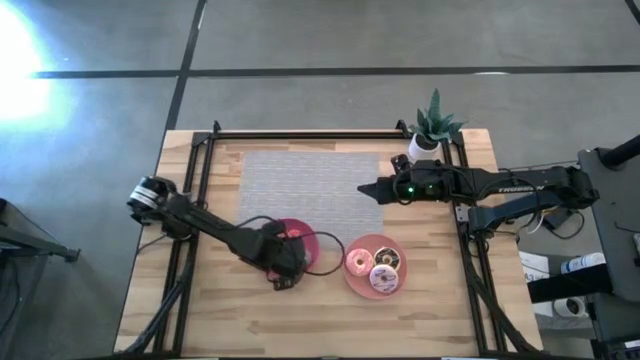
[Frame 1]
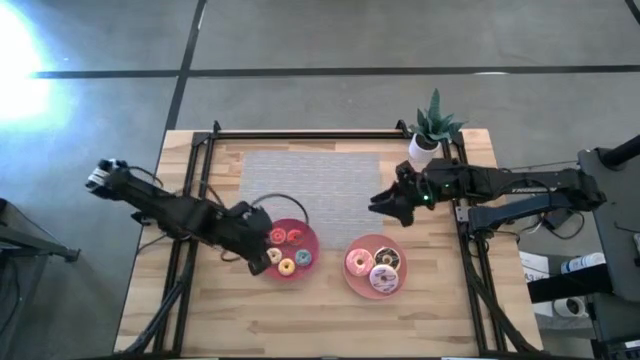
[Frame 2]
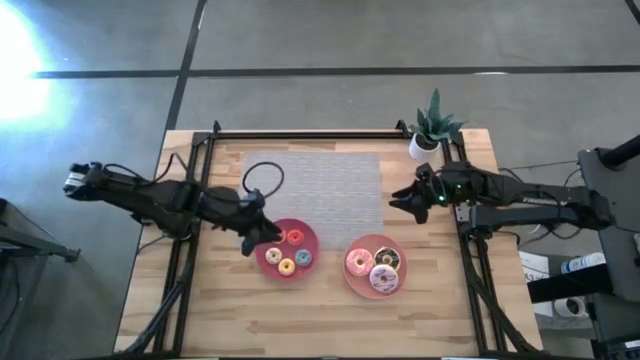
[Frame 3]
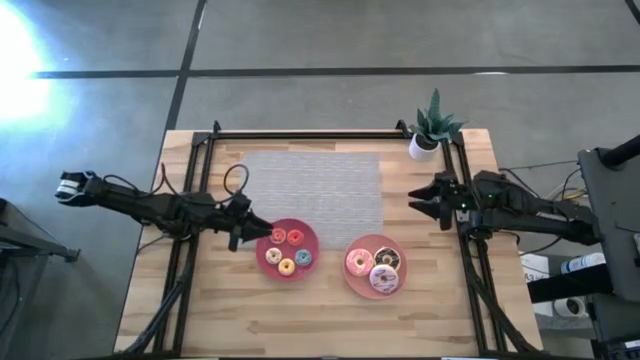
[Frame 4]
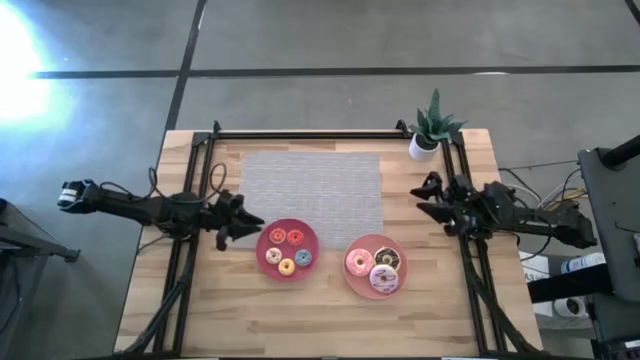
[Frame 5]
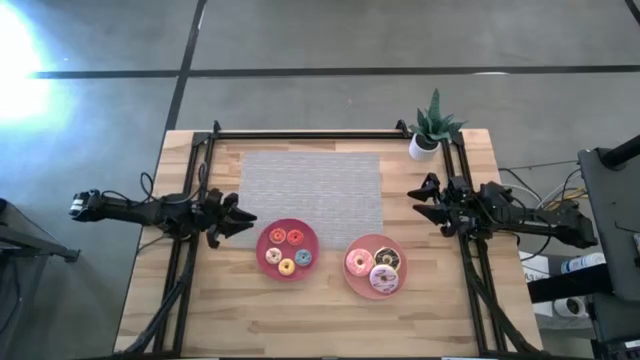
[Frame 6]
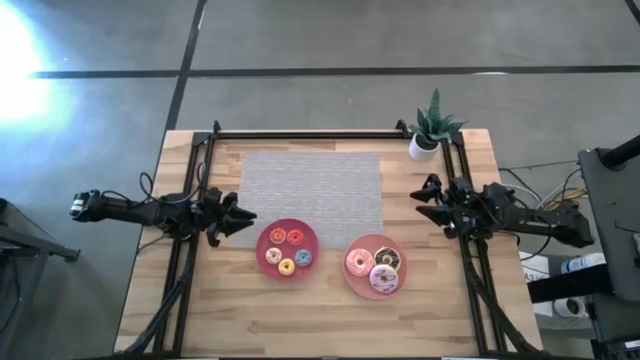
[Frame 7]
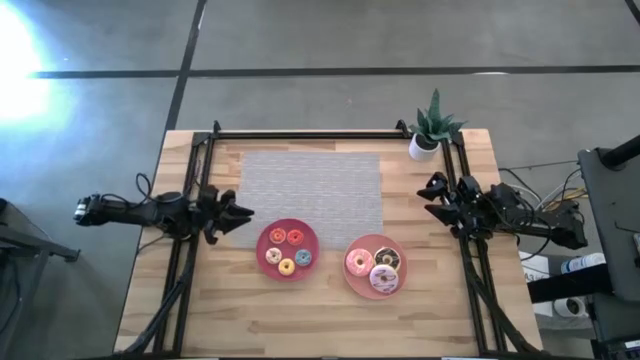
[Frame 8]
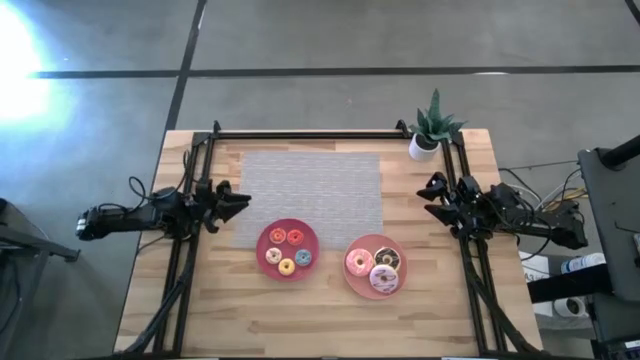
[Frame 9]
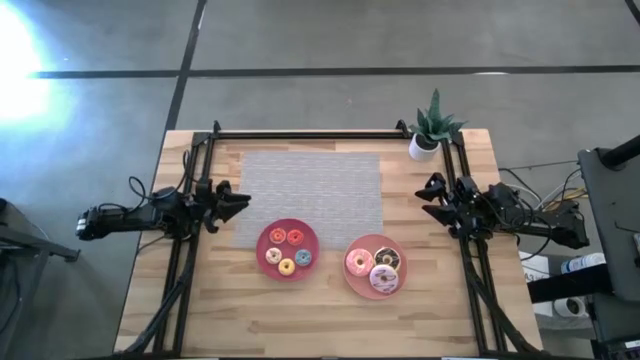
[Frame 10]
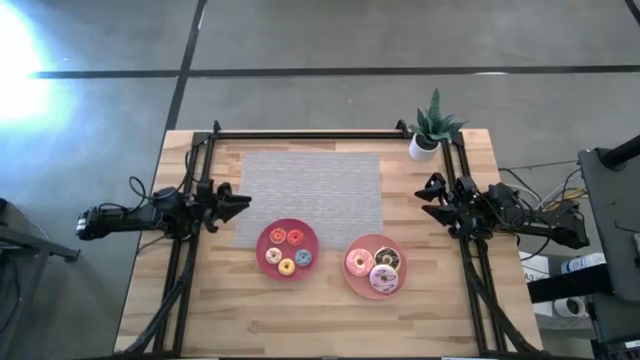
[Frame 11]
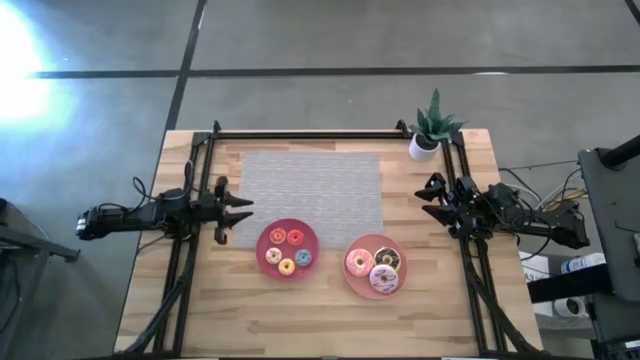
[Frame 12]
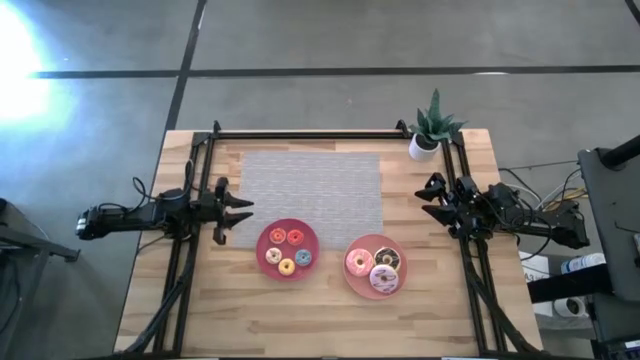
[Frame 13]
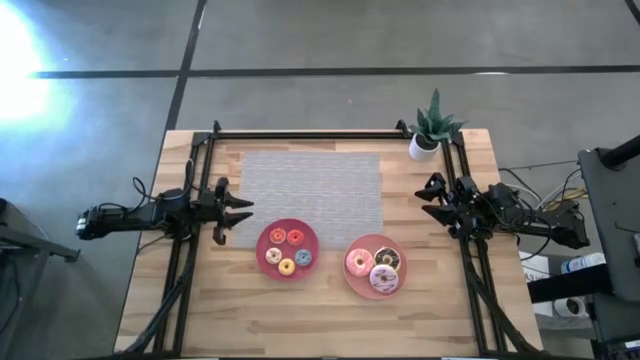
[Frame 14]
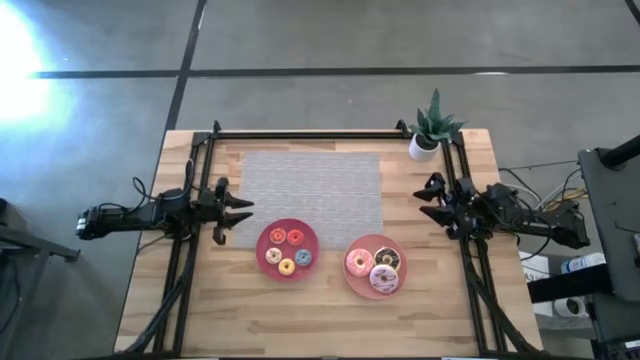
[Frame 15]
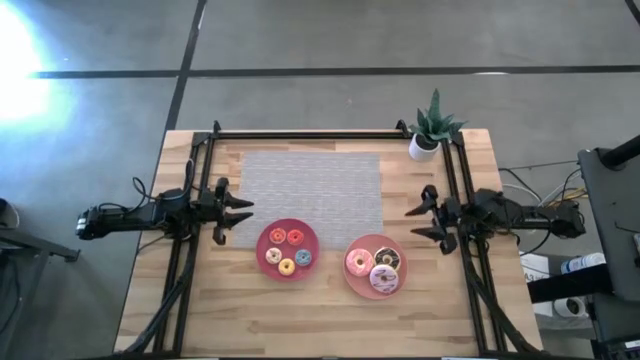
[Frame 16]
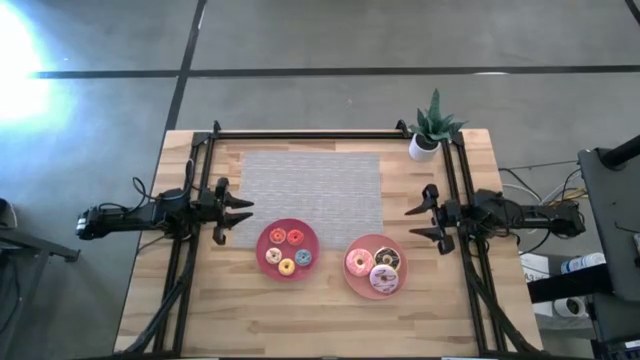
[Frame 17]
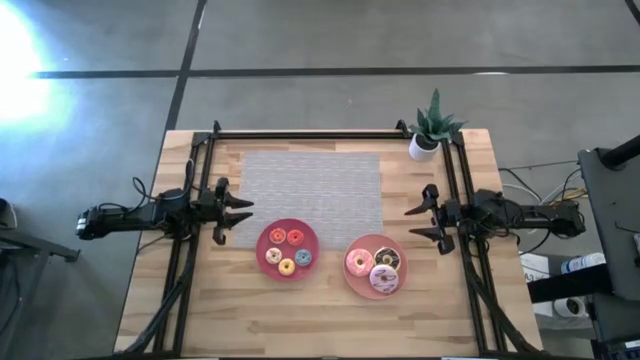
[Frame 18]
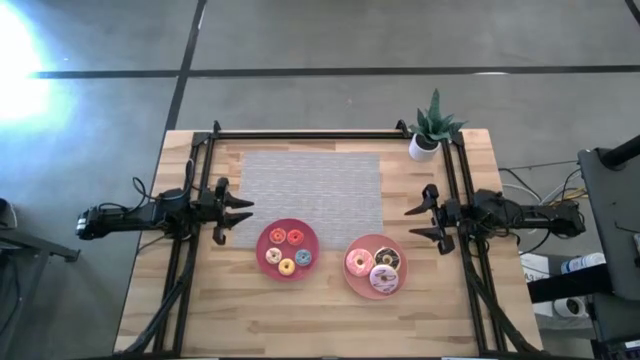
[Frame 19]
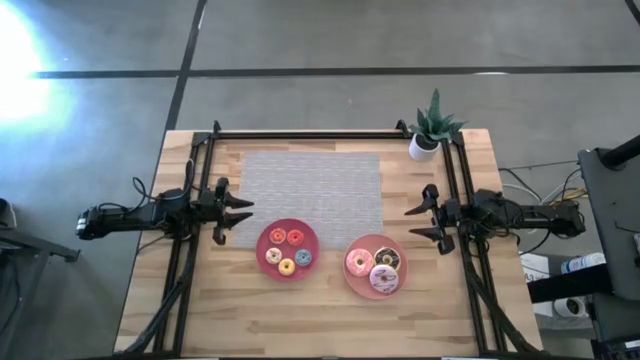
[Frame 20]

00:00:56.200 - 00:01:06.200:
Task: Pick & Place donuts
Return to Home Position

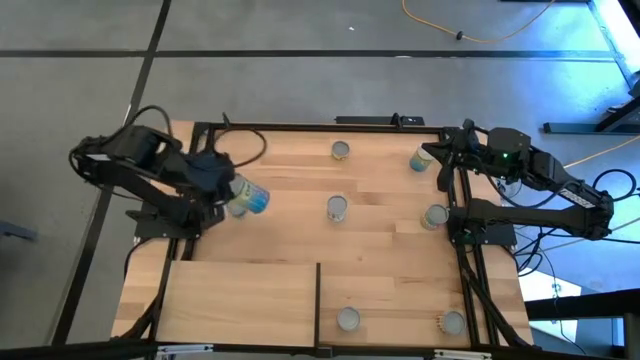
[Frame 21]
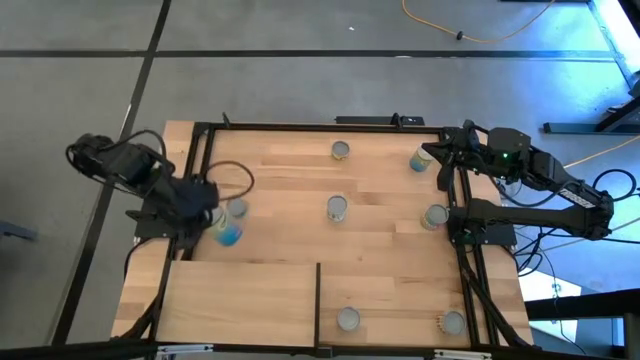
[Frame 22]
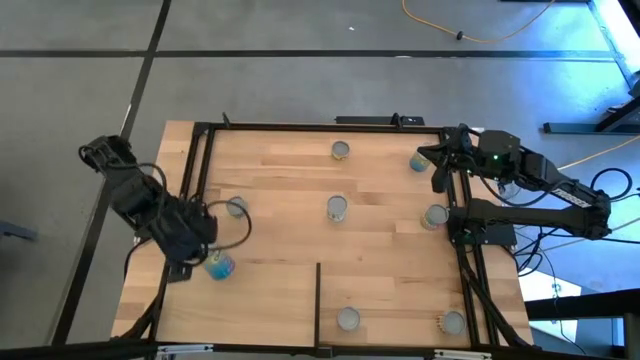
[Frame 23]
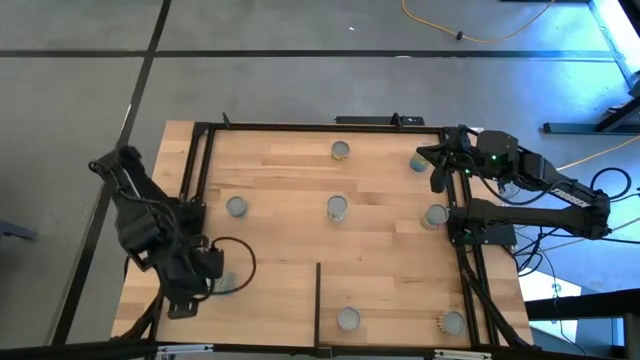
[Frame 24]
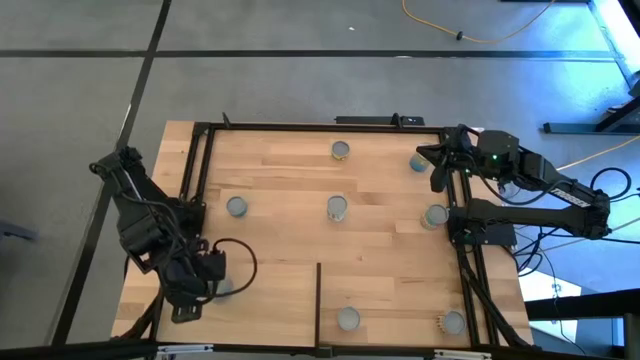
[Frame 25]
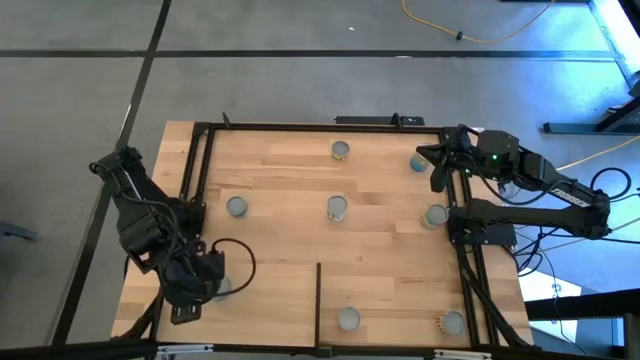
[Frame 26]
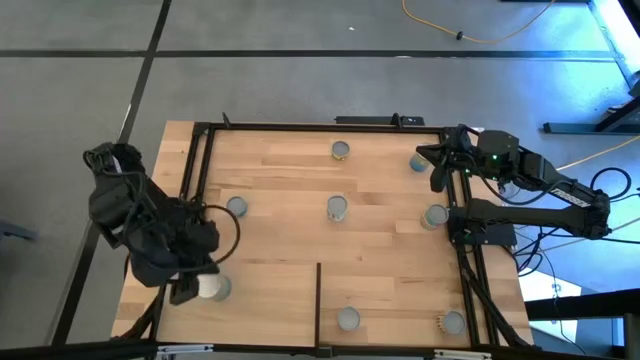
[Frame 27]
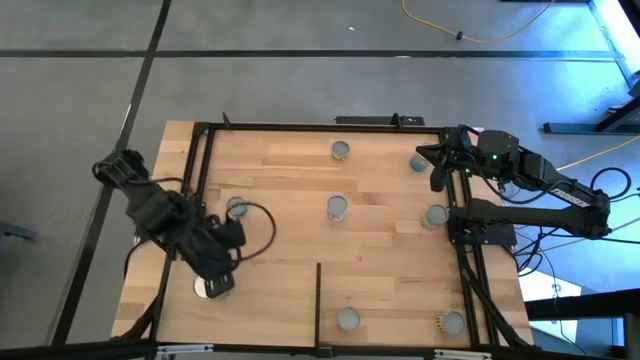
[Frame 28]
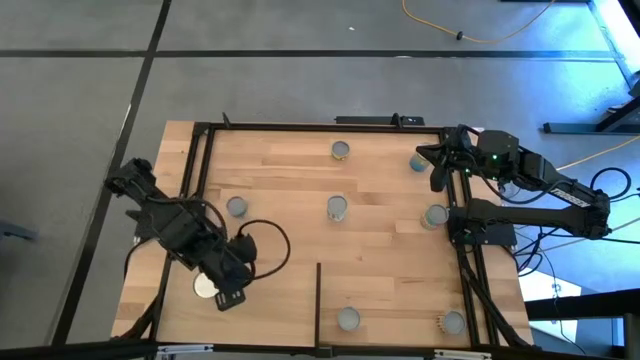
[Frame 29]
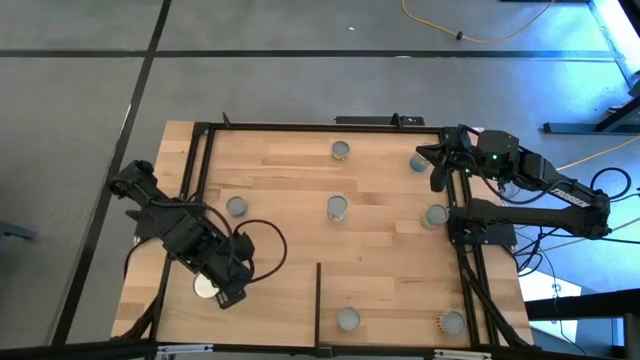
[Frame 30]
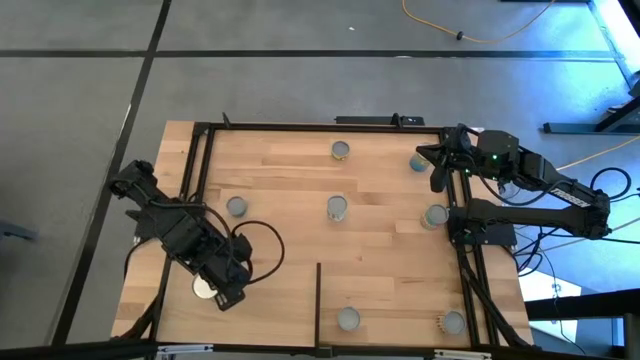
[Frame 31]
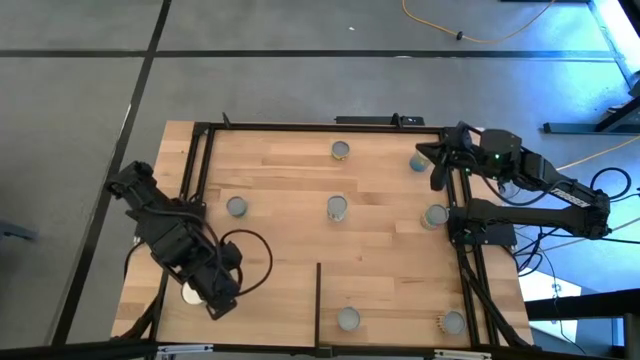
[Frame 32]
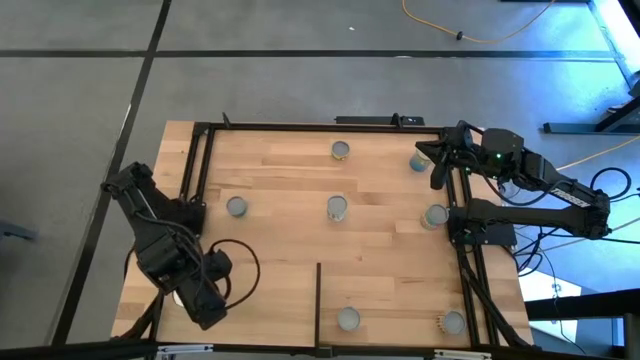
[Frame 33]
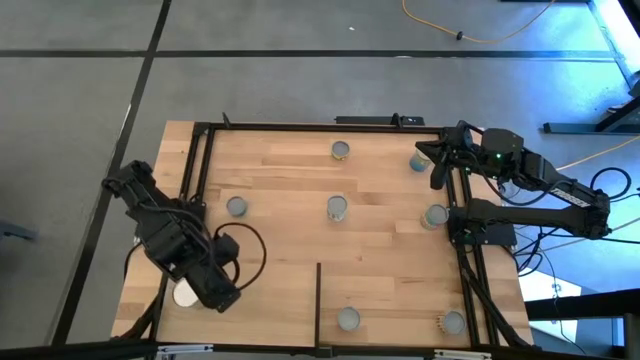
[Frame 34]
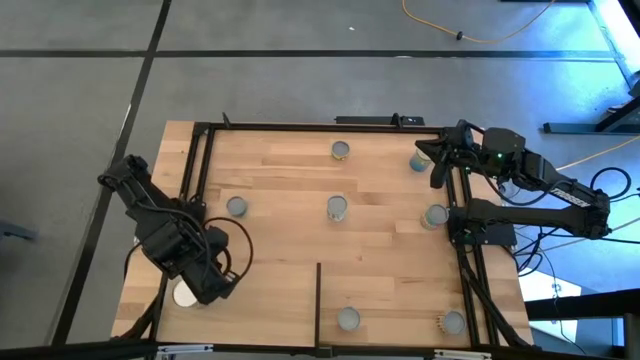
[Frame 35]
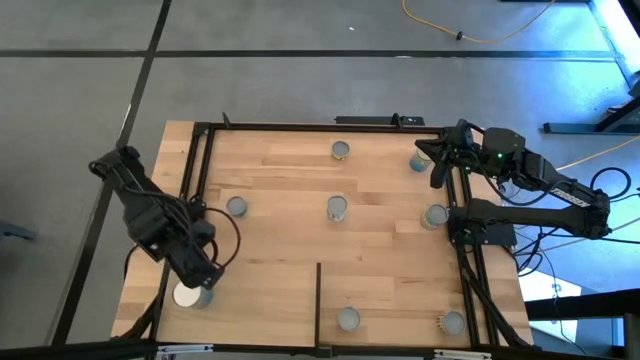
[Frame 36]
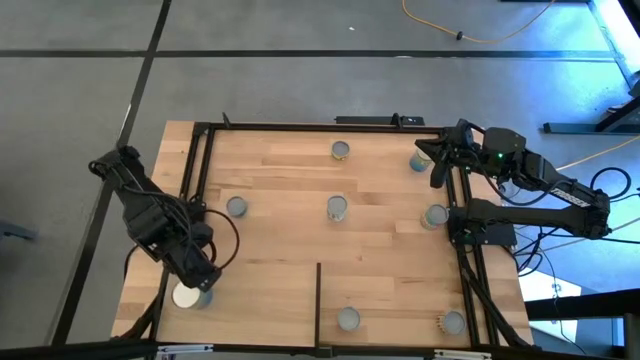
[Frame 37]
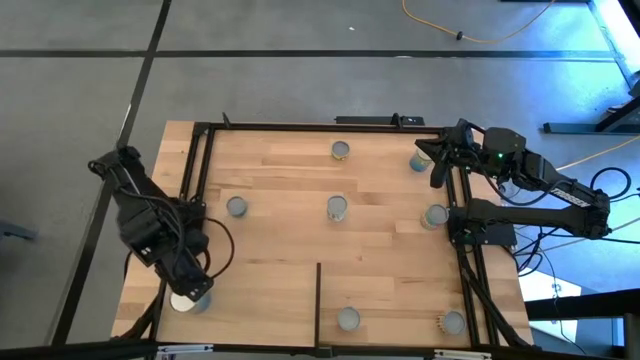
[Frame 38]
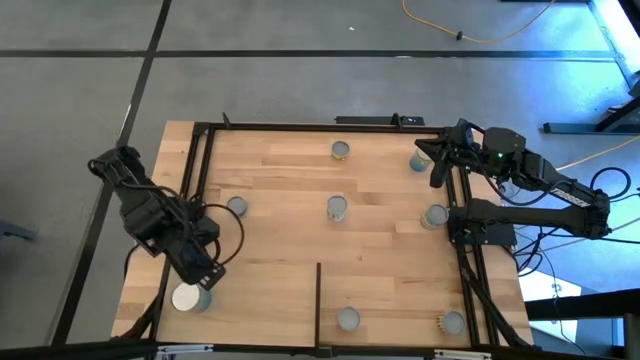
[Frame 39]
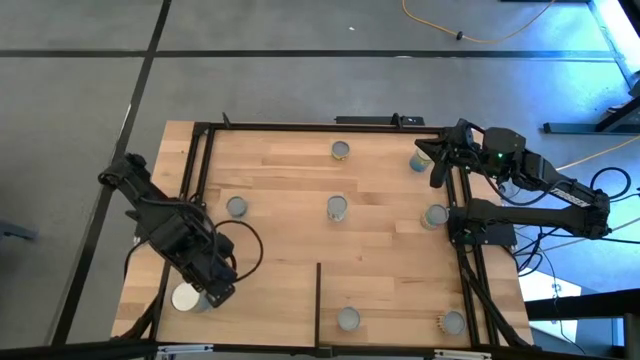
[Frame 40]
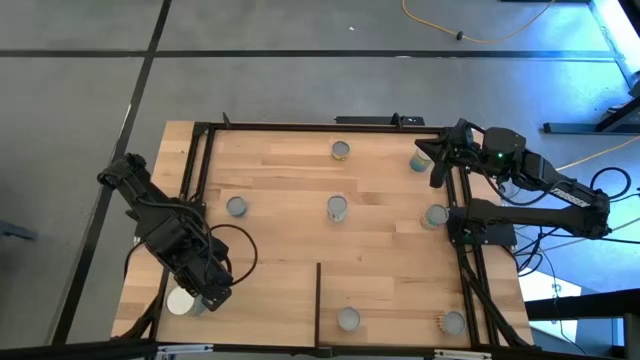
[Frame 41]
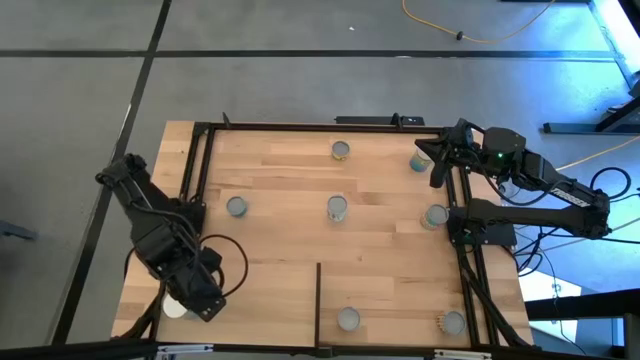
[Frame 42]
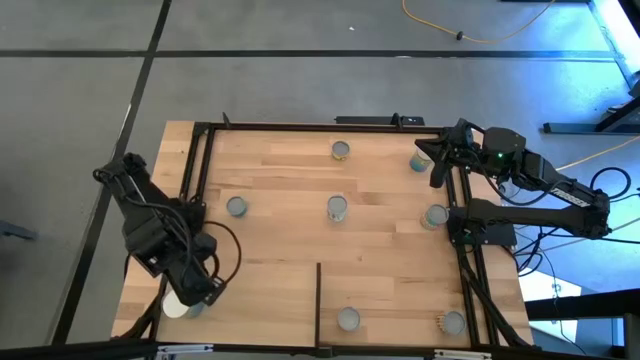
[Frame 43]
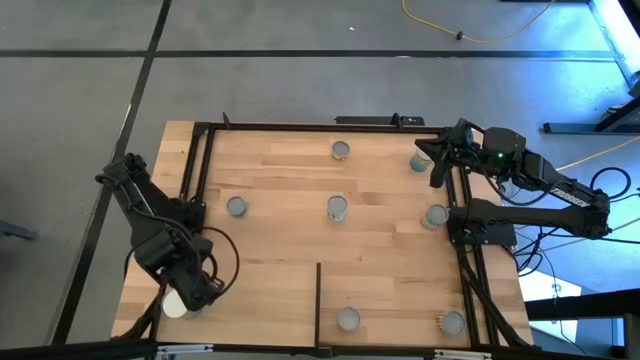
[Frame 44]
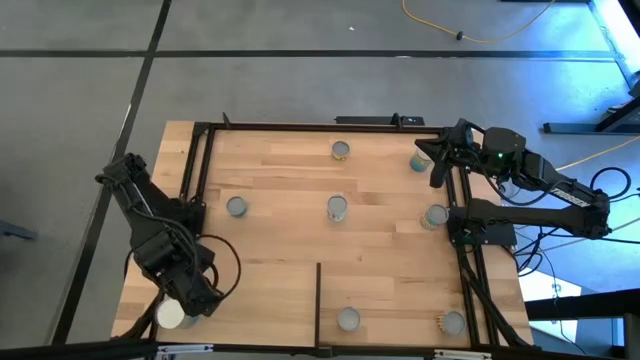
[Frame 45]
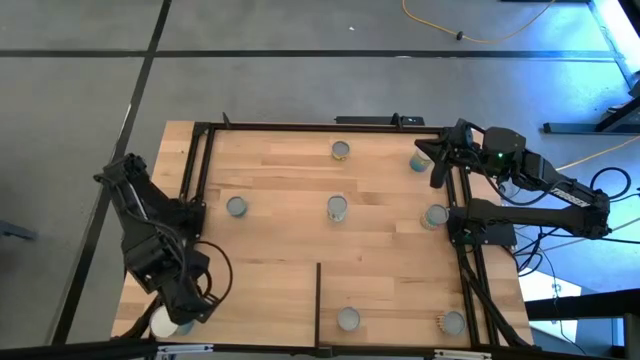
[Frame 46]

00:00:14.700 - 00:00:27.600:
Task: Pick and place cans onto a shelf
Put the canned cherries on the shelf
